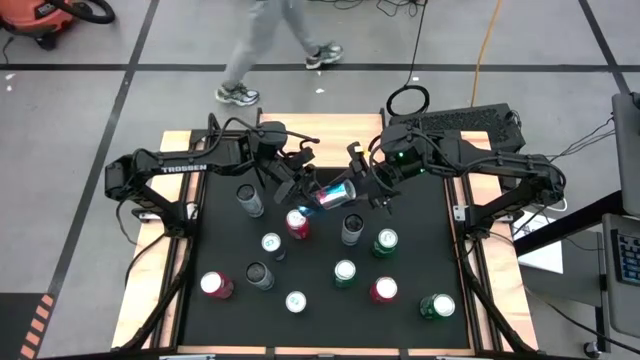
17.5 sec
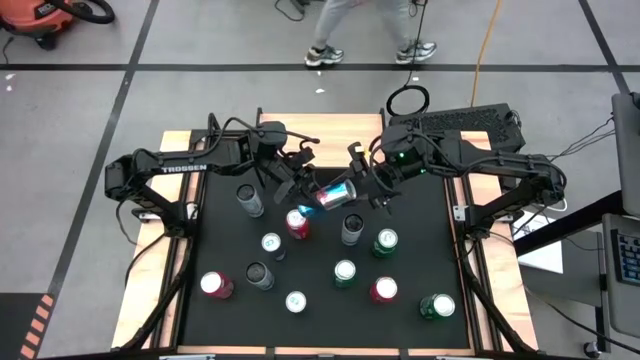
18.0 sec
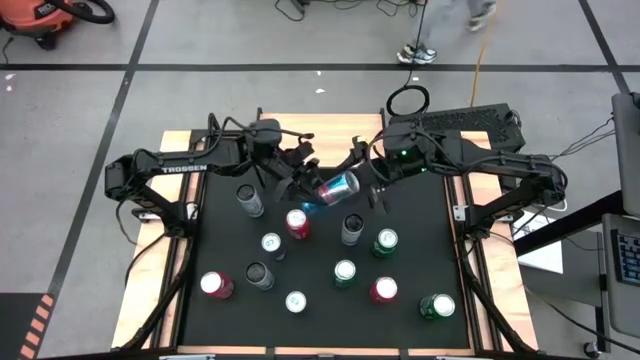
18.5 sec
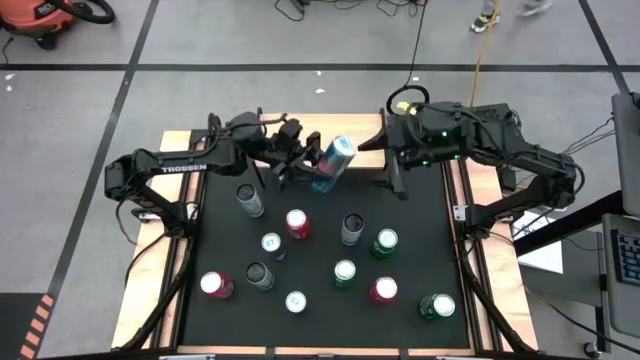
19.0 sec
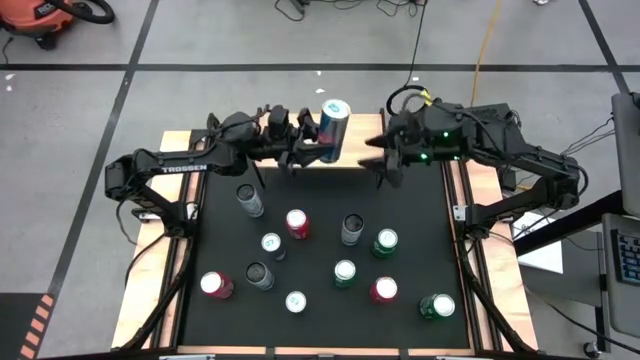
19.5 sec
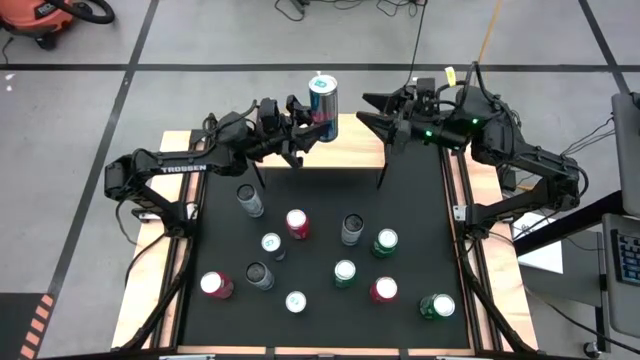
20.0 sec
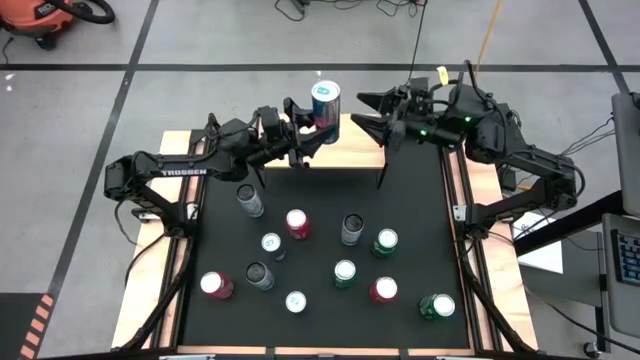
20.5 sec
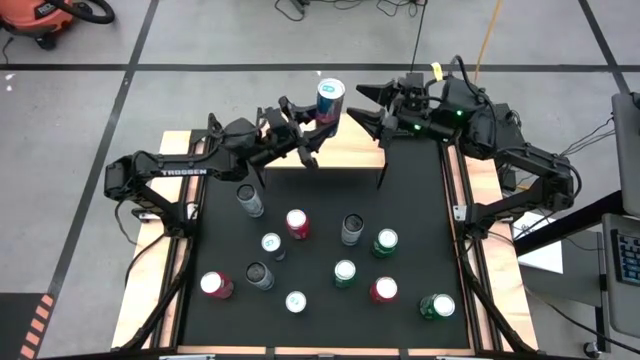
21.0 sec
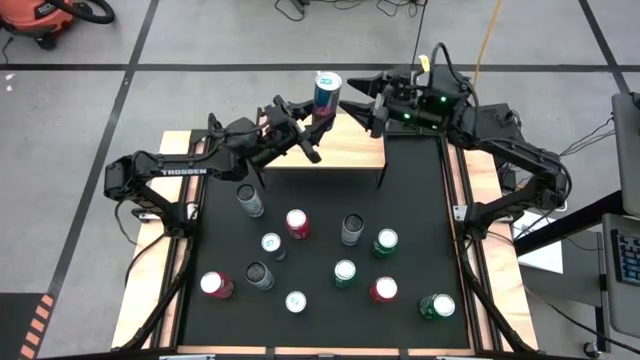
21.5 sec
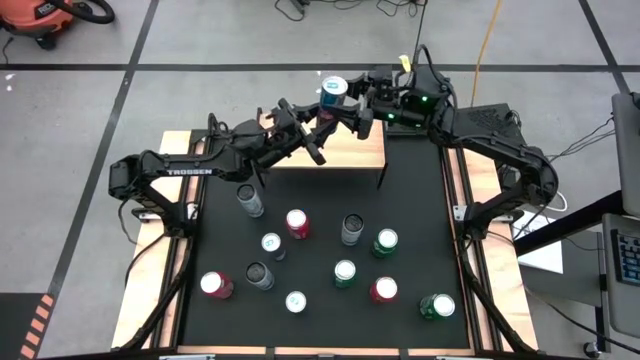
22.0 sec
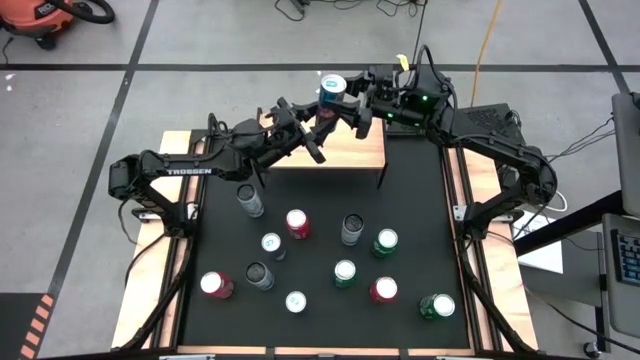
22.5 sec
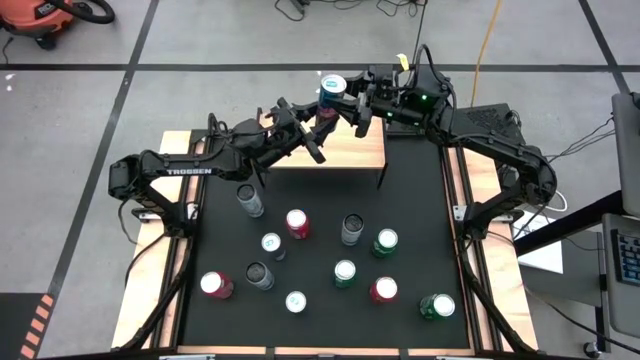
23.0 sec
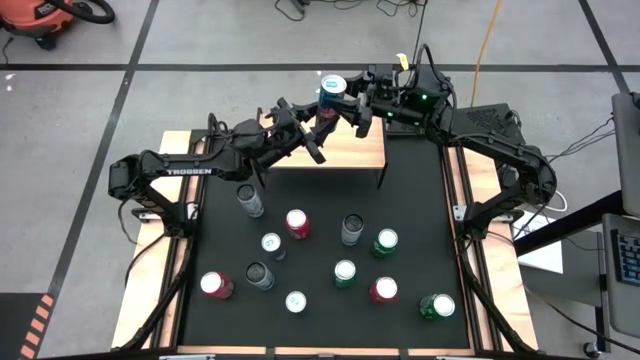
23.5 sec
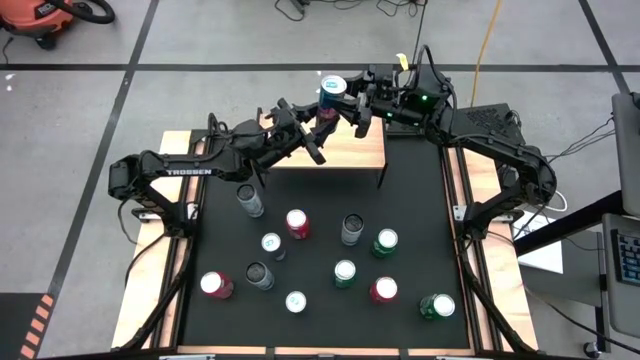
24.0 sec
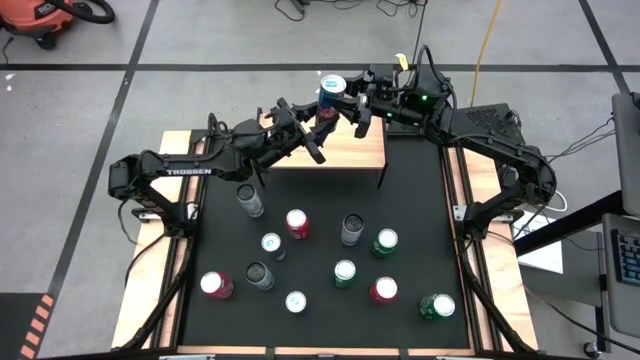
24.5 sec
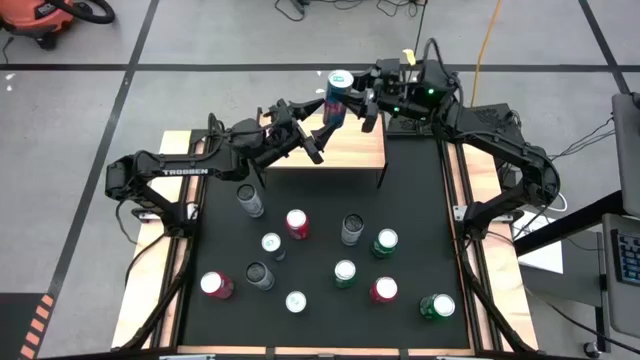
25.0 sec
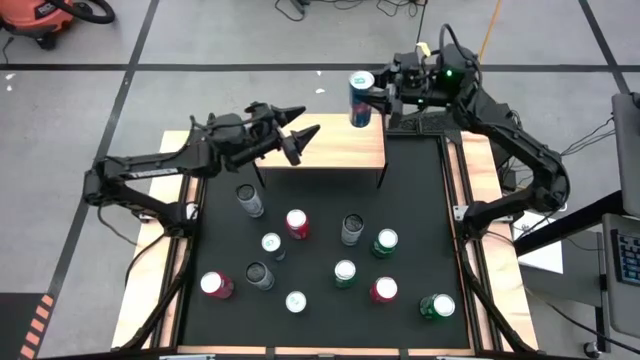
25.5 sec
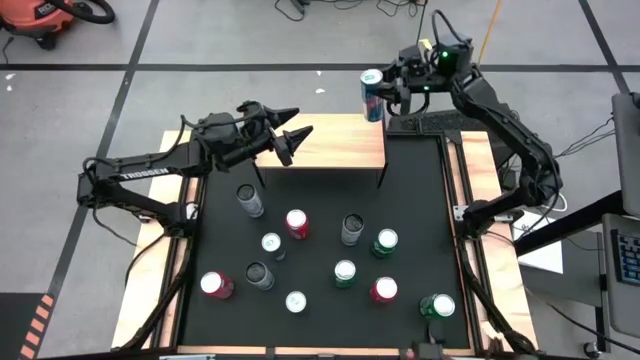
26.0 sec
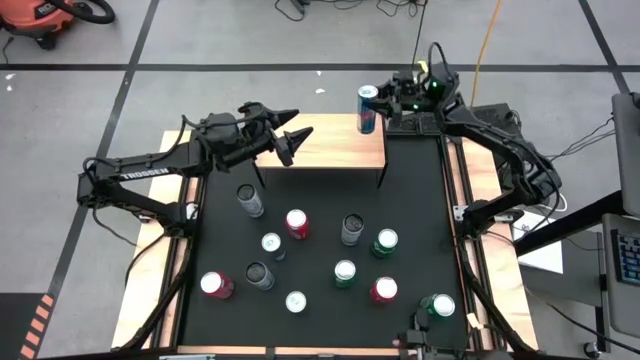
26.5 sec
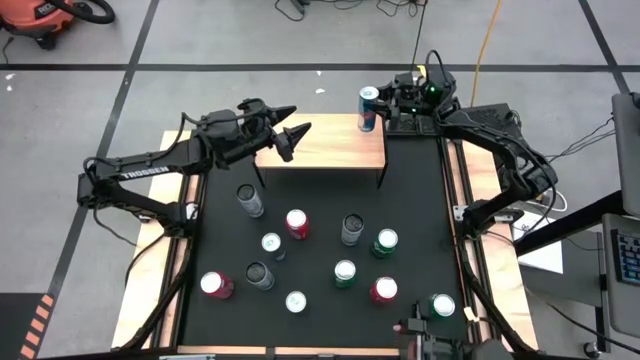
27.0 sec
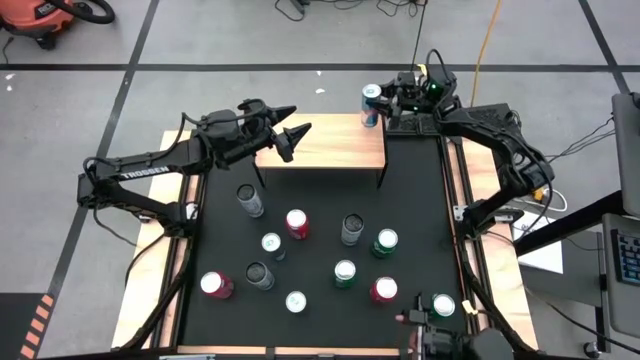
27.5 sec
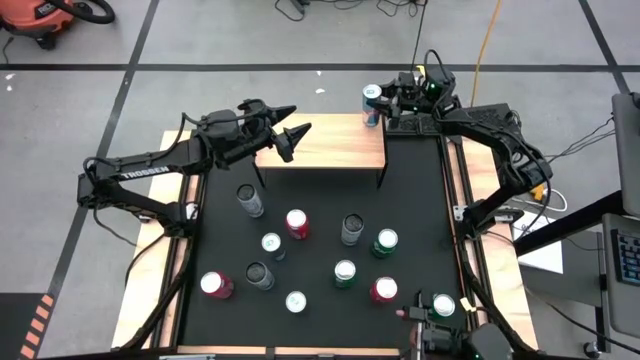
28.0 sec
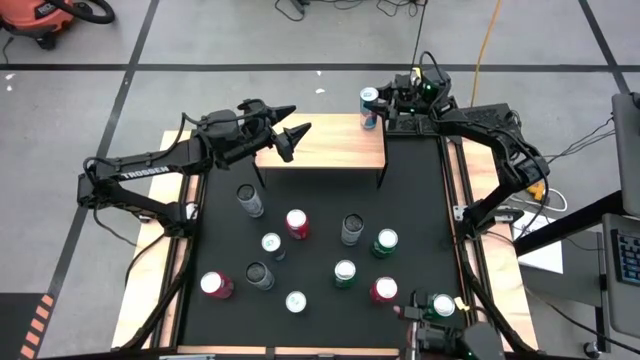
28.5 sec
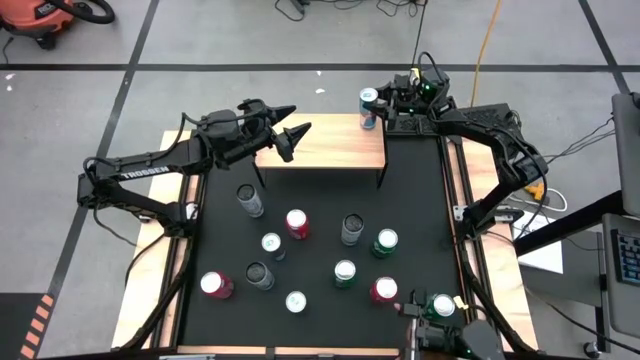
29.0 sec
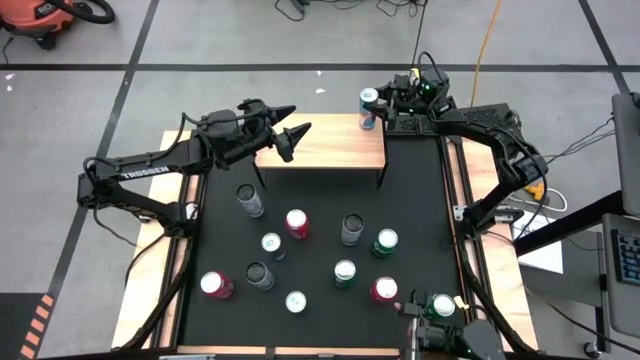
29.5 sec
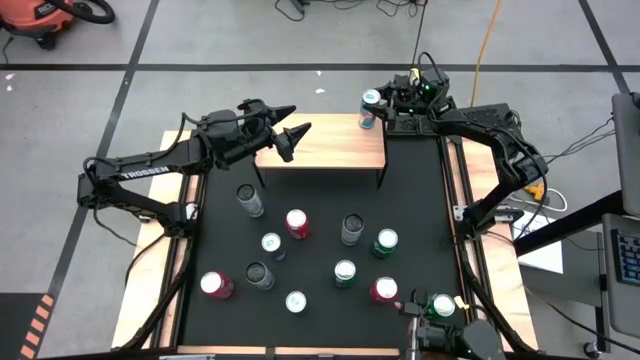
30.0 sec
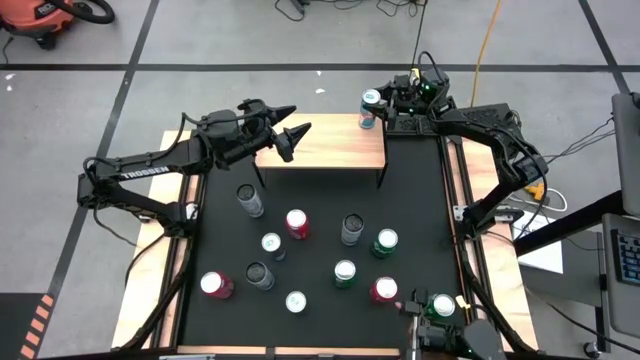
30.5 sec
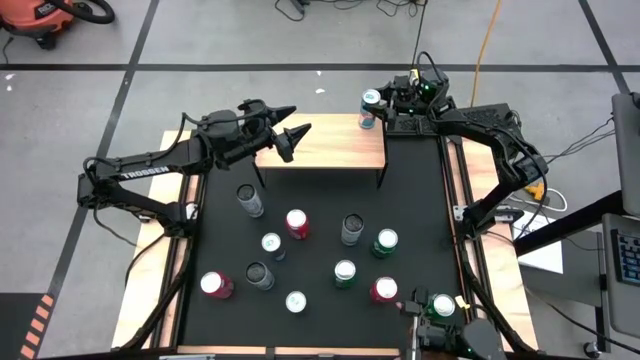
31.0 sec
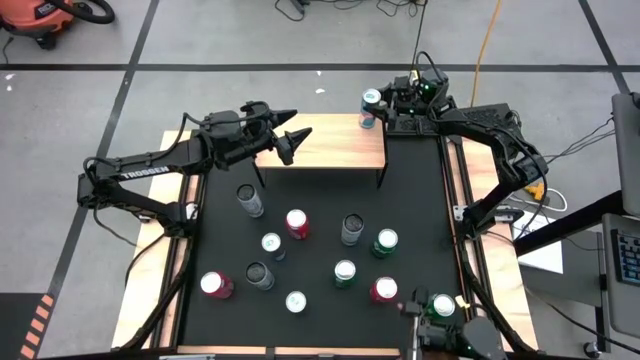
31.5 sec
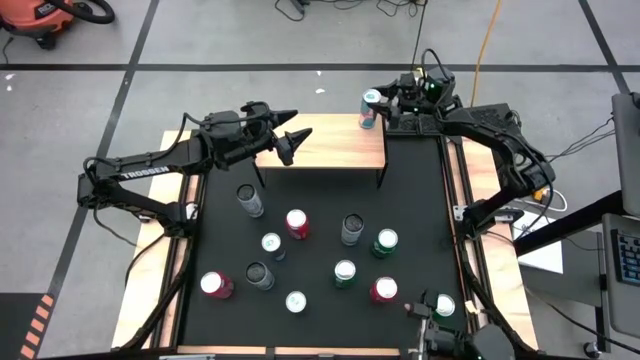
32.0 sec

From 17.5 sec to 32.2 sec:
Task: Place canned beverage on shelf
Put the top right blue soda can on the shelf

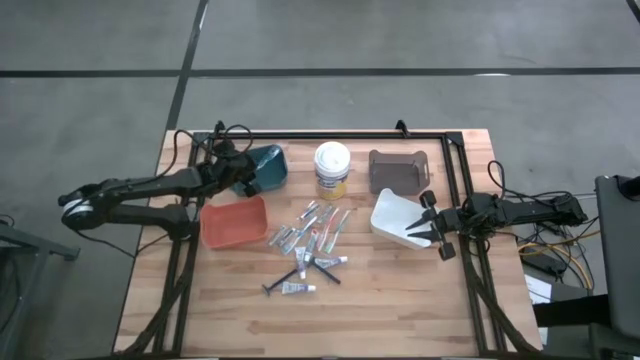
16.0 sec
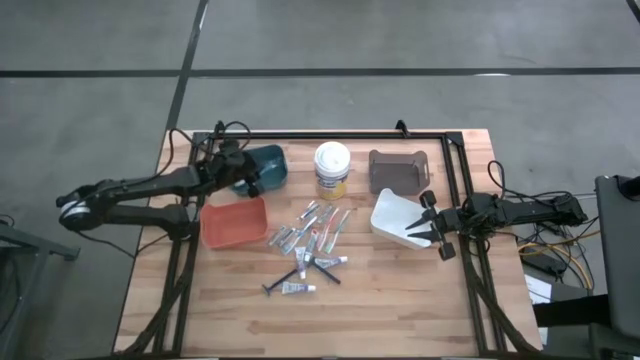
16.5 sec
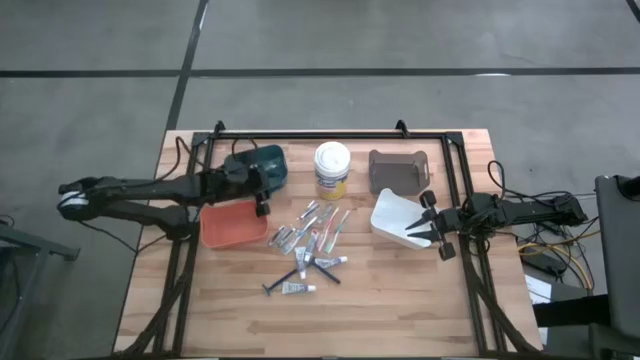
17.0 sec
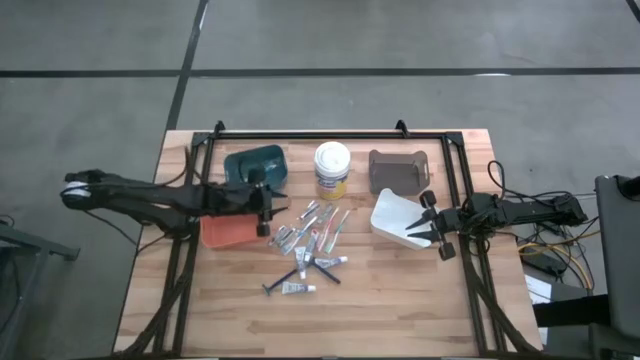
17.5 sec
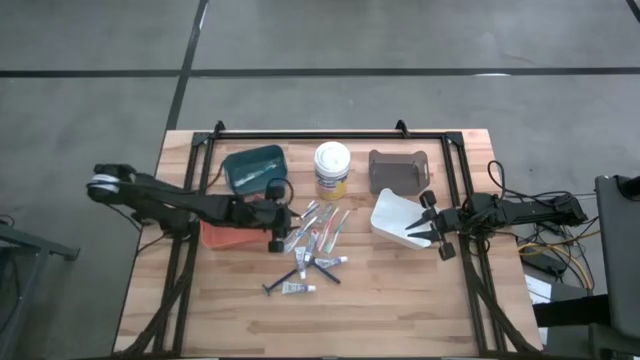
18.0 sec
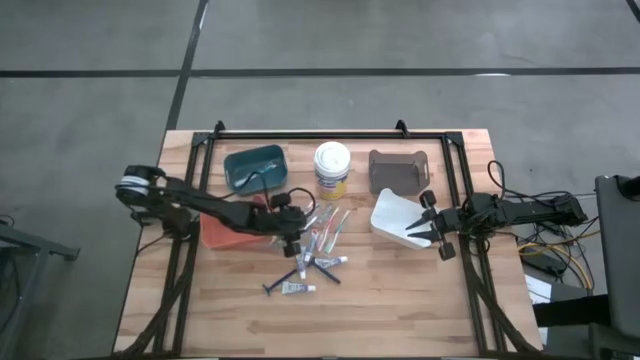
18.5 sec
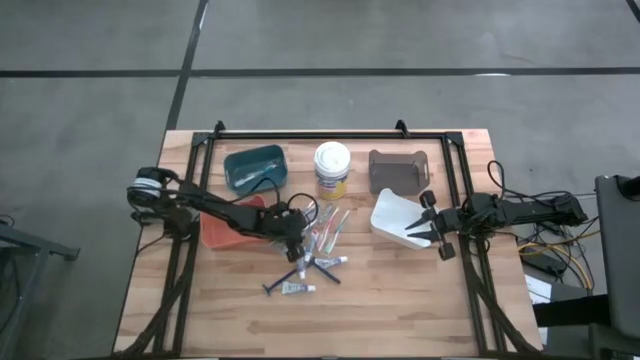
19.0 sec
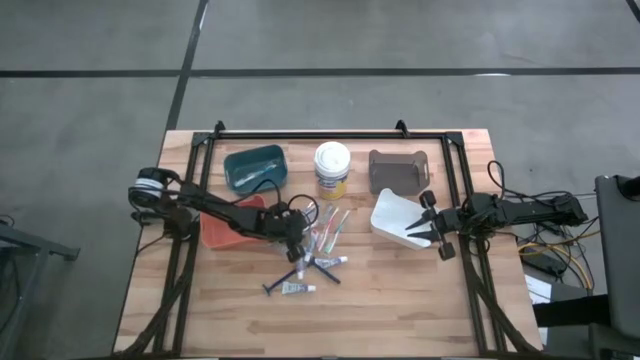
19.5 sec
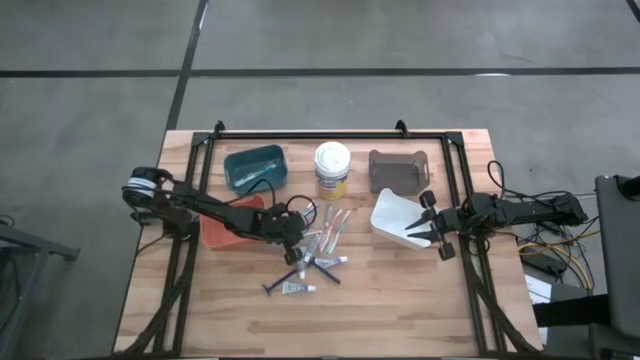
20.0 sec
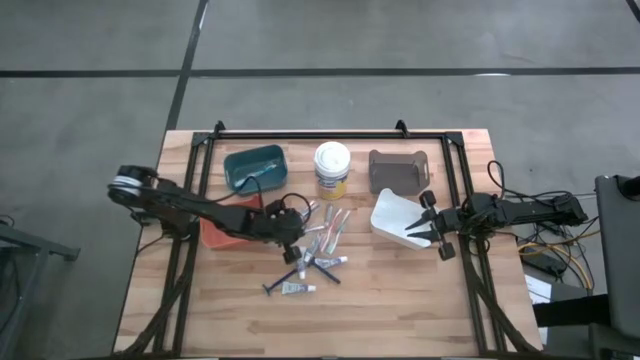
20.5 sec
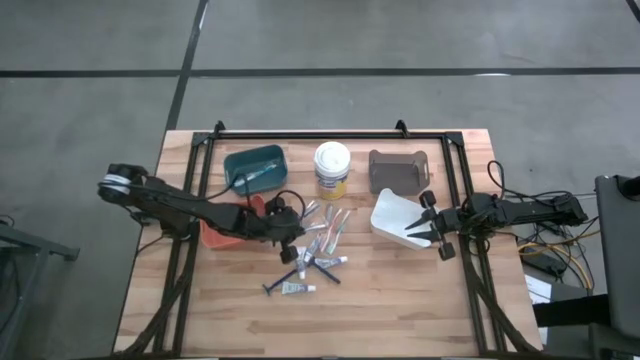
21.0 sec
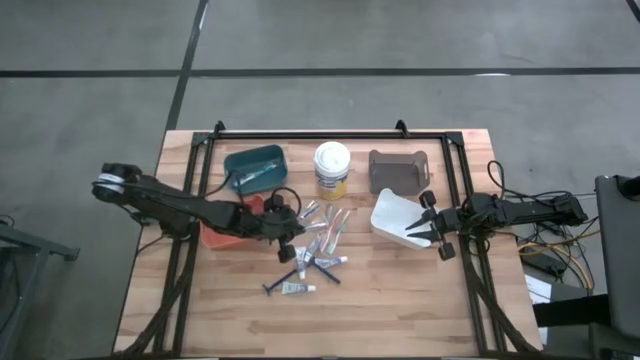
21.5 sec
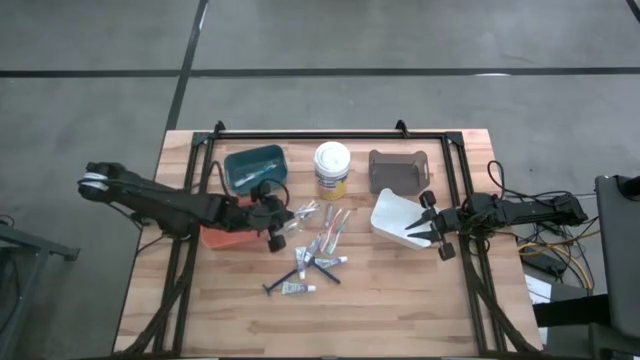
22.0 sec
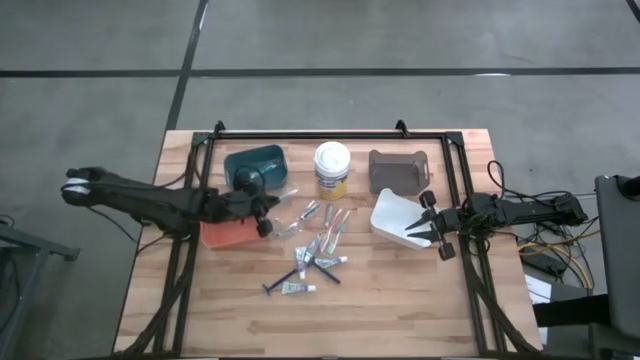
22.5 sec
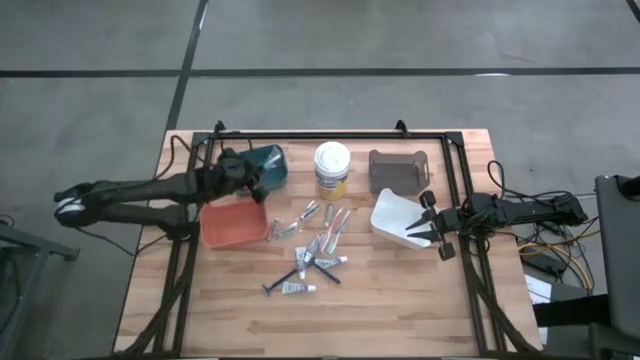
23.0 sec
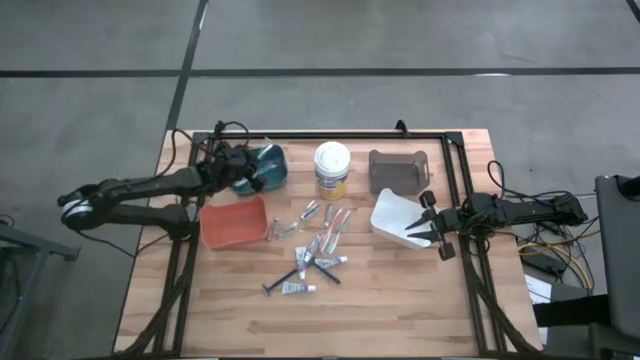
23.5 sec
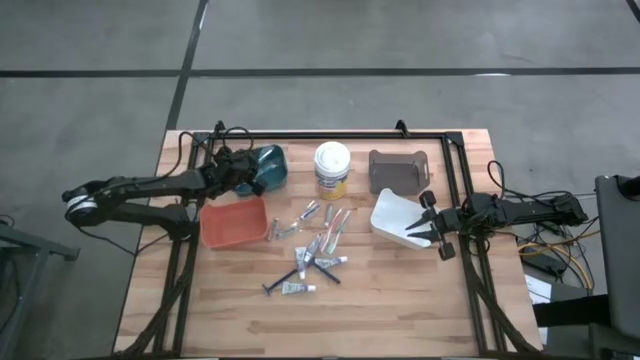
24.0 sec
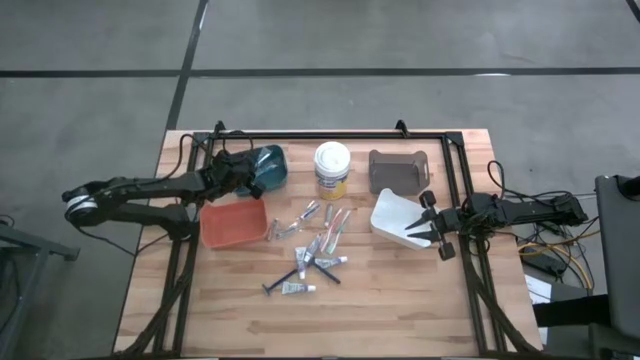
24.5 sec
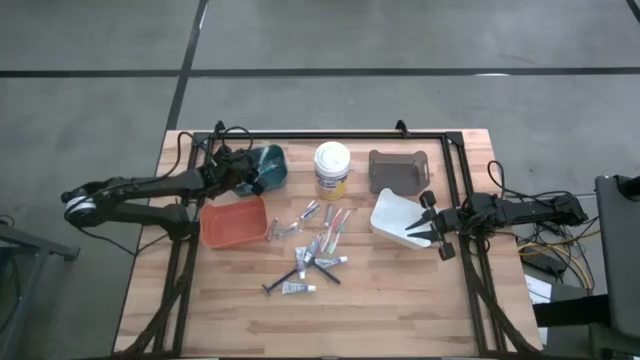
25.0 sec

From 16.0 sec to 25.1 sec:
Task: Pick & Place Travel size toiletries
Put the blue toothbrush into the blue bin
